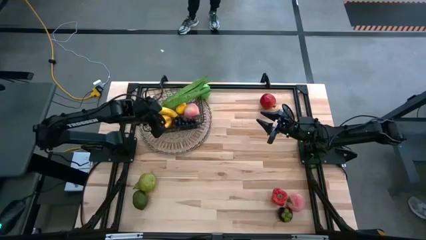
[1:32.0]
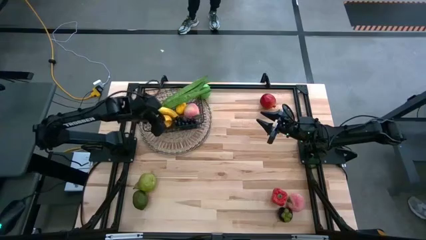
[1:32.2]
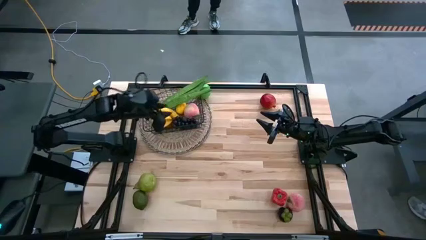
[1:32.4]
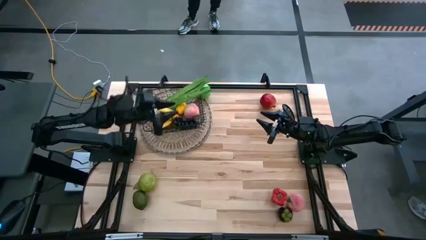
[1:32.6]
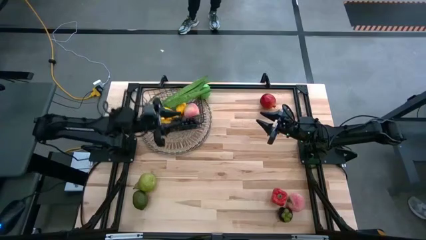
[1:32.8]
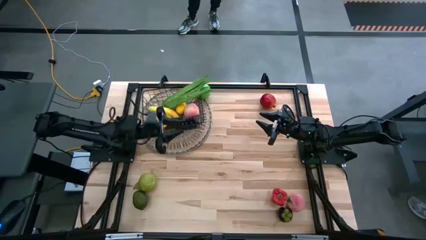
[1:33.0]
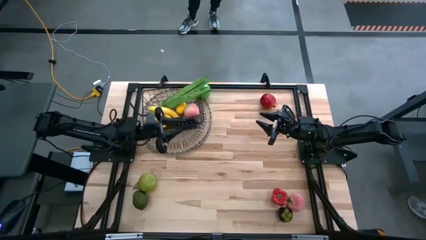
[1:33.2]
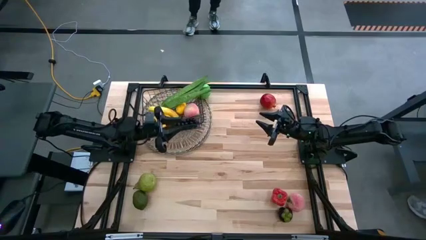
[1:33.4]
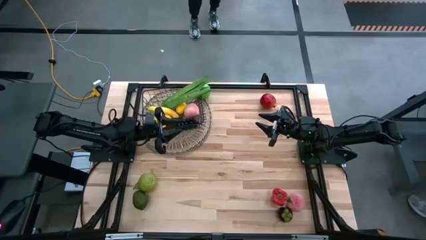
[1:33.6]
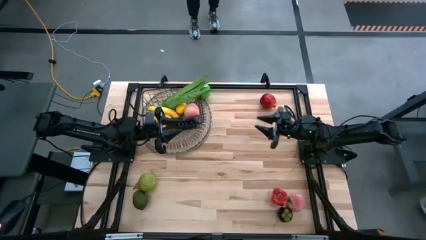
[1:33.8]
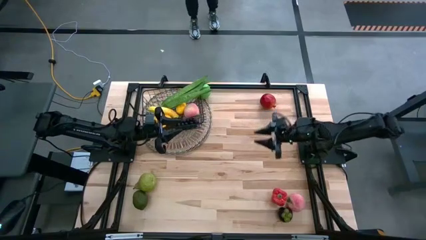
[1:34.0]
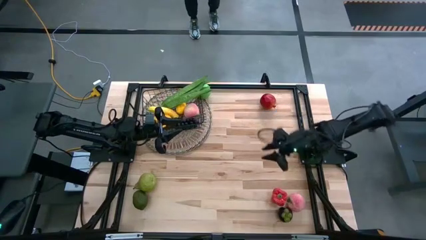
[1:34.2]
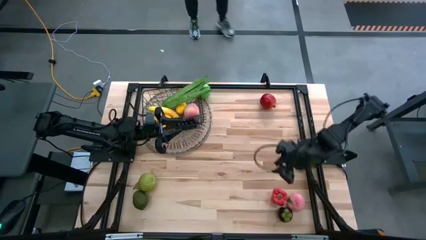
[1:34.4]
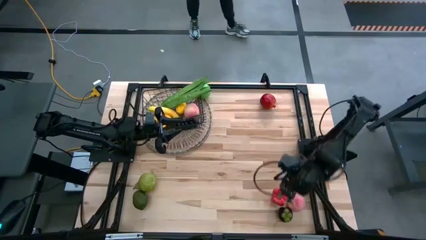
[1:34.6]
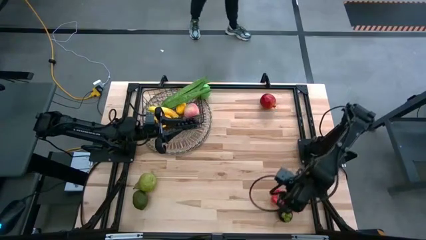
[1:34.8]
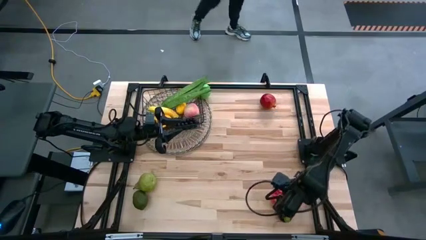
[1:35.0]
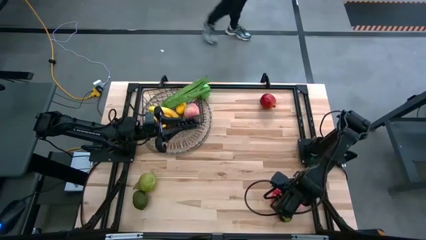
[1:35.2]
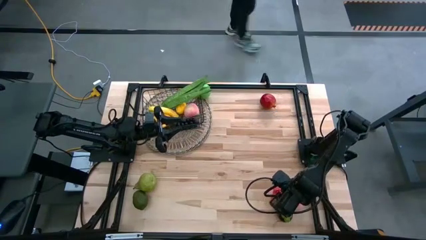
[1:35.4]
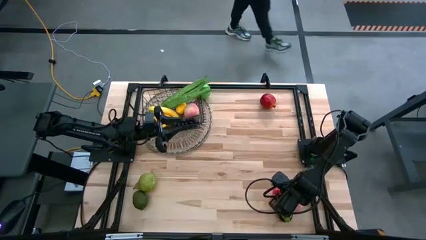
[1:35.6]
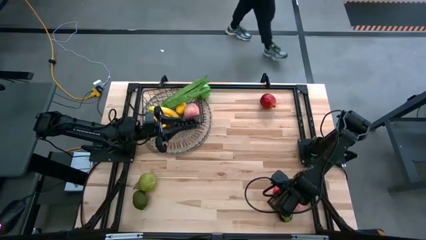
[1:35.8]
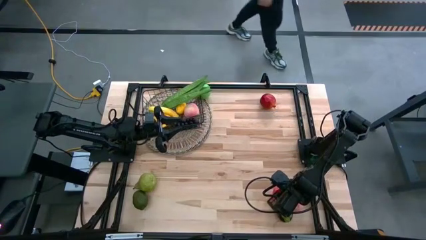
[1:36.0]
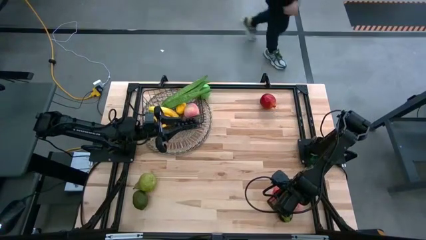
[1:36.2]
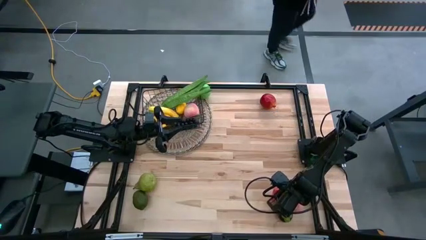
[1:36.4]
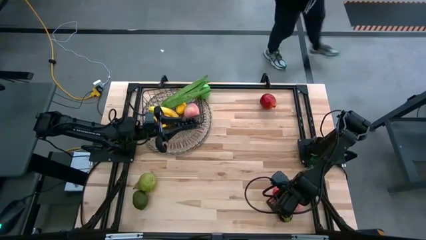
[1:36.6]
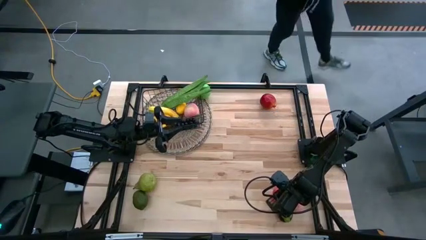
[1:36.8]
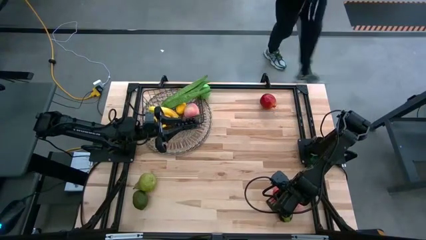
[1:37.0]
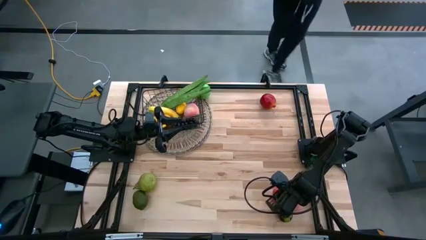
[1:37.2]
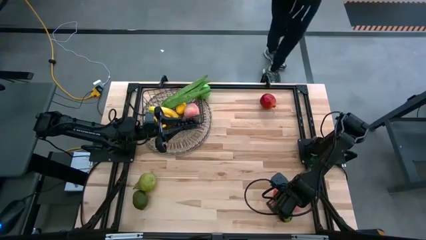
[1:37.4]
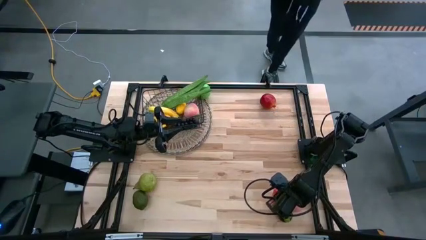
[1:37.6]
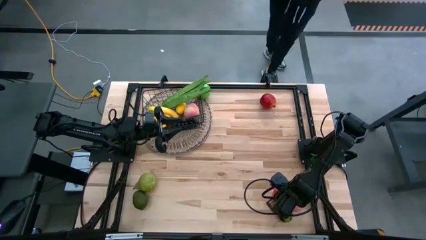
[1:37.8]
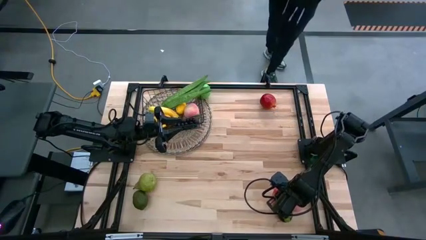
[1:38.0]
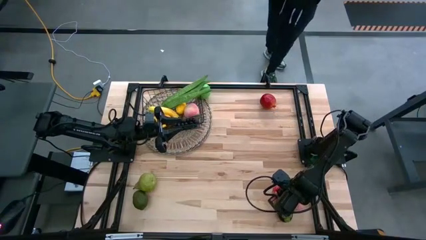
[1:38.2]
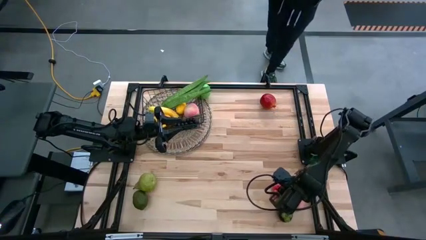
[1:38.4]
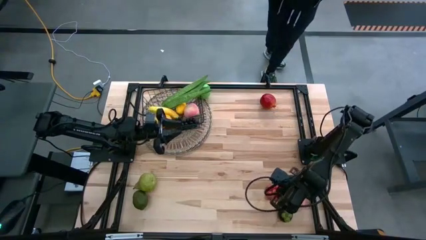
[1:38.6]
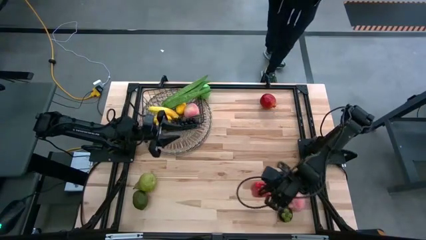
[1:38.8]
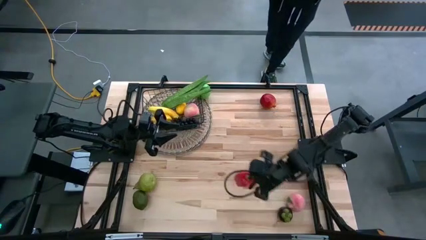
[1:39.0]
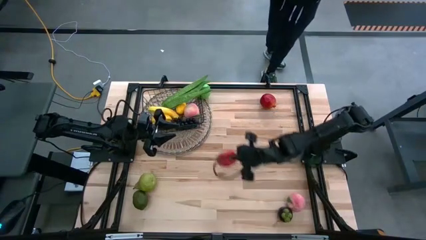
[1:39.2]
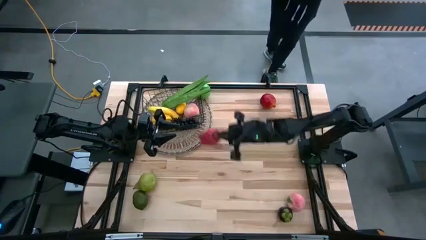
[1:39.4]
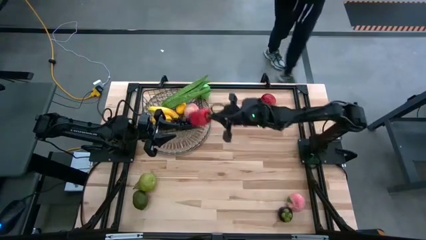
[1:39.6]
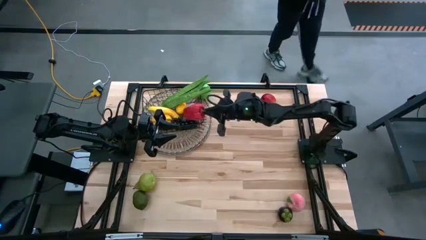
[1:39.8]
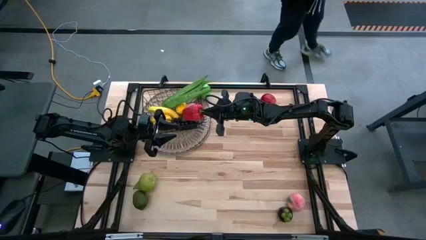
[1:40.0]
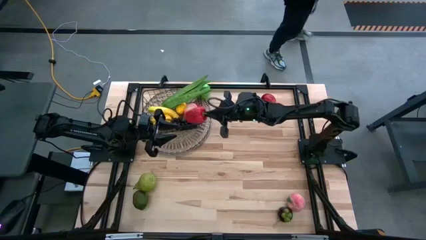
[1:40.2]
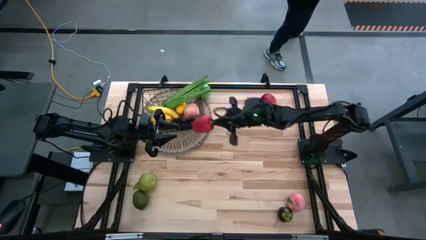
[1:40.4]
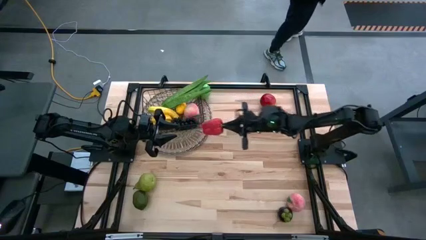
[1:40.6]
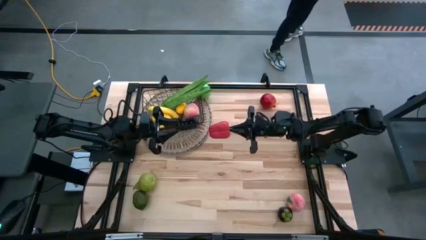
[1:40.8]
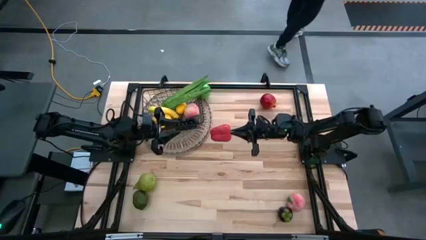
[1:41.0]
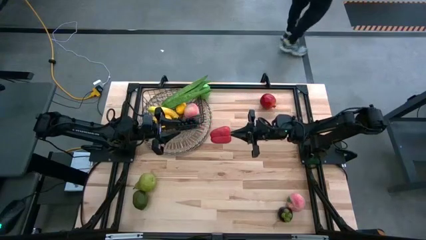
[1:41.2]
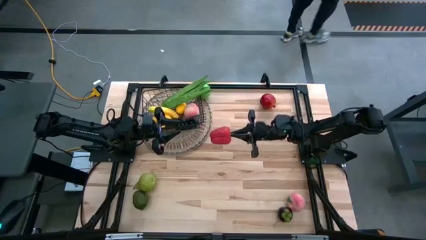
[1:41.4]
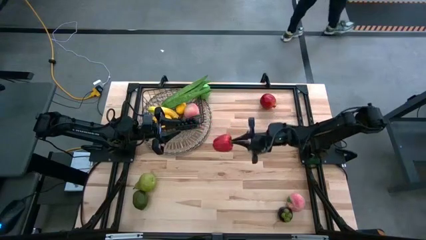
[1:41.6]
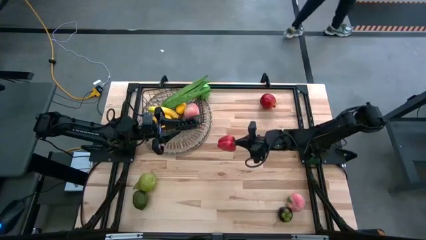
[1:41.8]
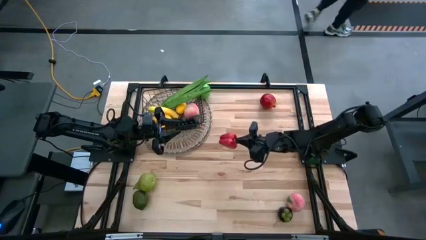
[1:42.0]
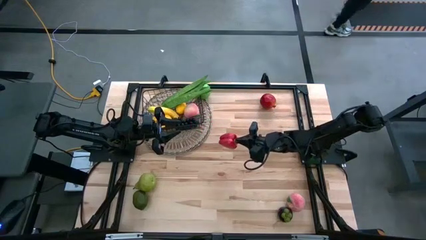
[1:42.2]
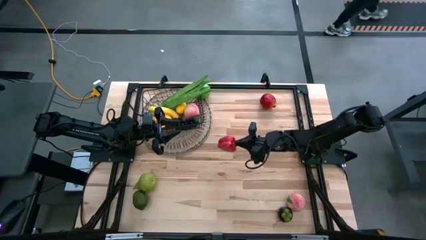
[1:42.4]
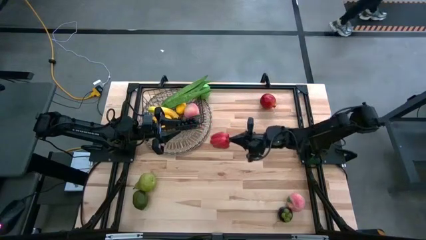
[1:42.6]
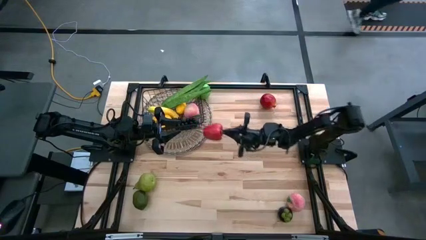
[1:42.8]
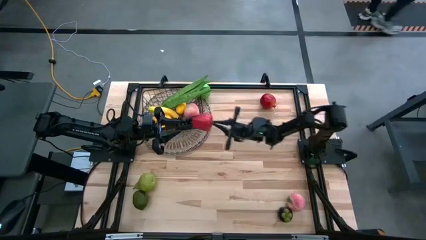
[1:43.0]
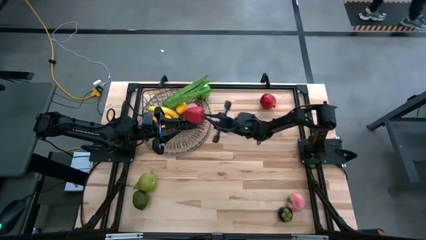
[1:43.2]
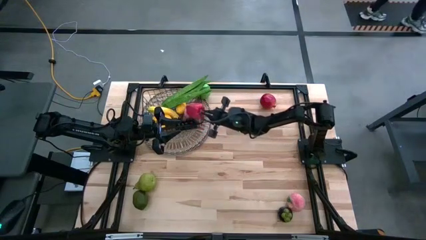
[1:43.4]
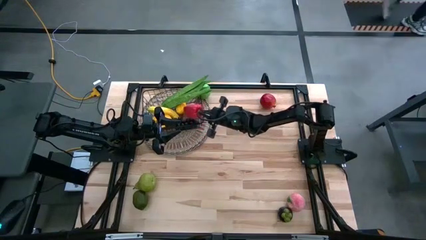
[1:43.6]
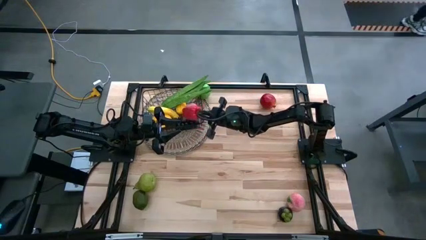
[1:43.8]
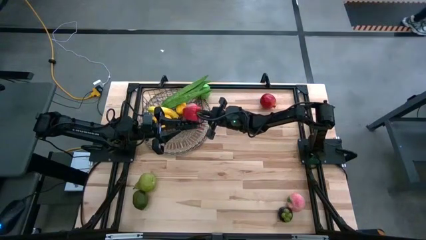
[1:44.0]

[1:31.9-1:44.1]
Task: Build produce basket
Put the red bell pepper into the wire basket
